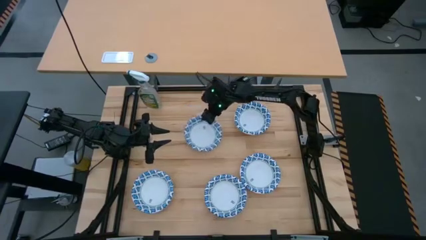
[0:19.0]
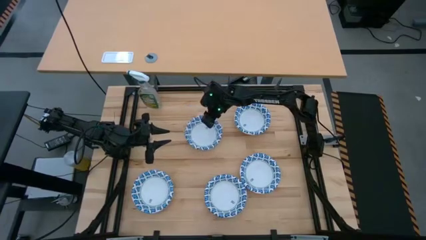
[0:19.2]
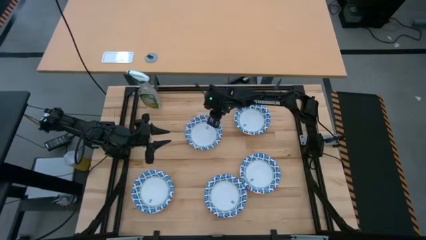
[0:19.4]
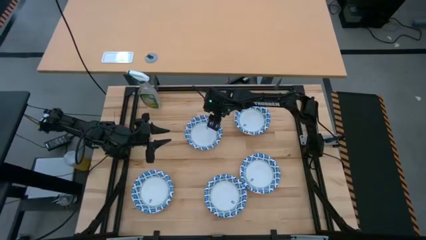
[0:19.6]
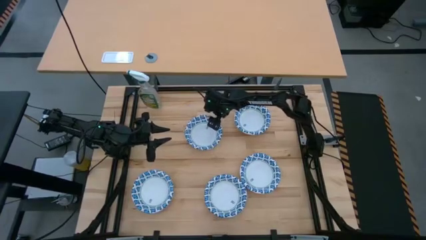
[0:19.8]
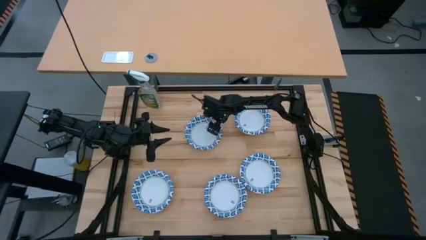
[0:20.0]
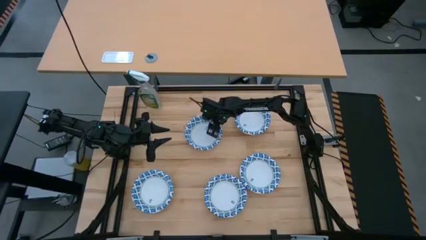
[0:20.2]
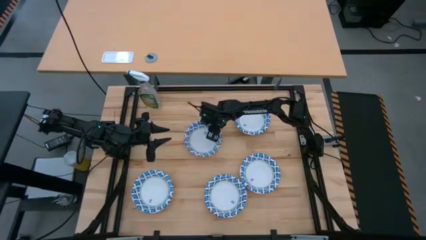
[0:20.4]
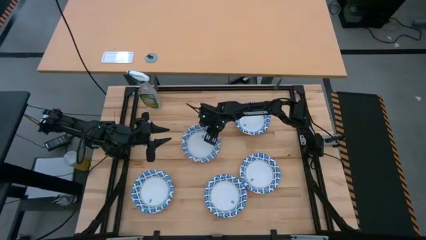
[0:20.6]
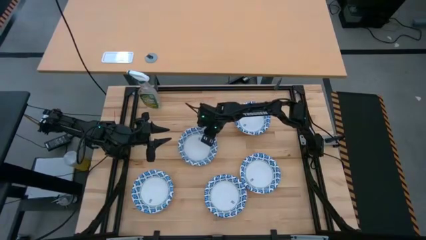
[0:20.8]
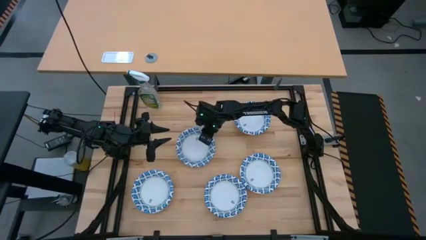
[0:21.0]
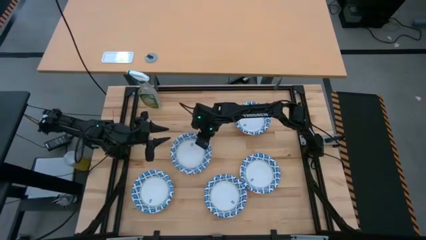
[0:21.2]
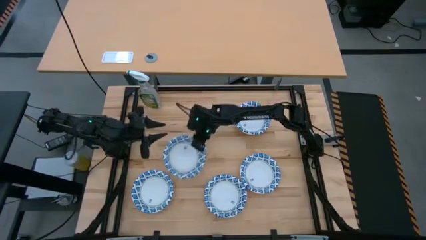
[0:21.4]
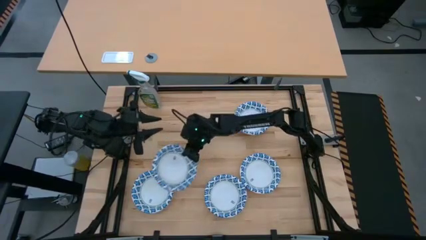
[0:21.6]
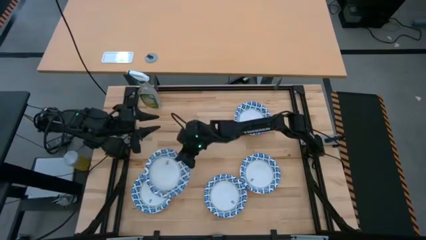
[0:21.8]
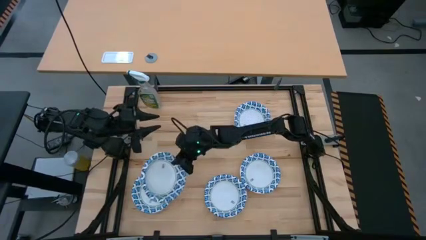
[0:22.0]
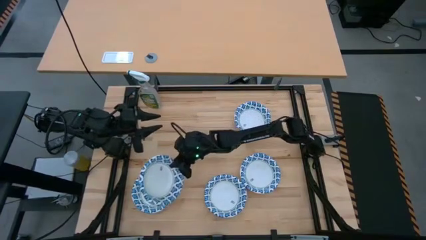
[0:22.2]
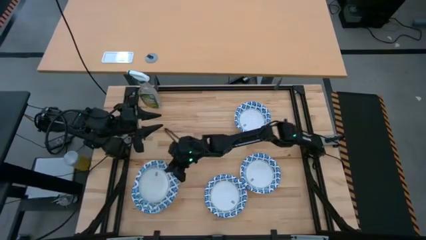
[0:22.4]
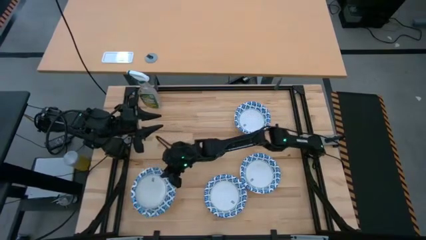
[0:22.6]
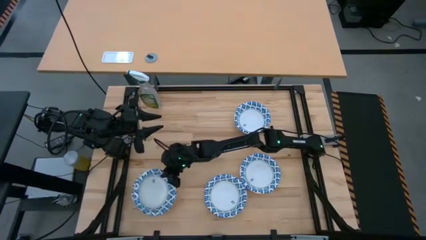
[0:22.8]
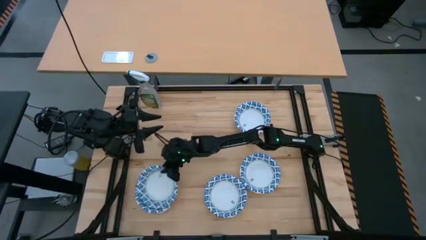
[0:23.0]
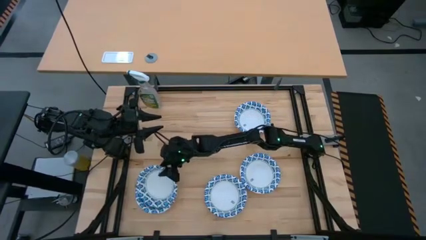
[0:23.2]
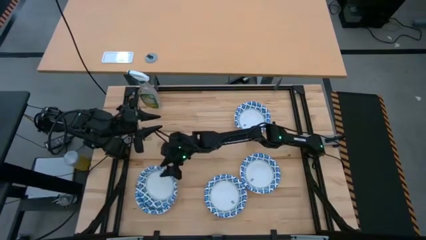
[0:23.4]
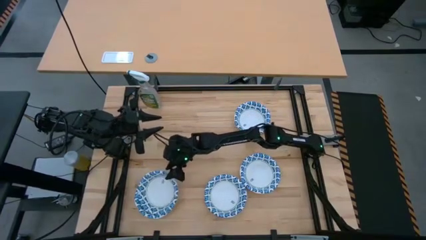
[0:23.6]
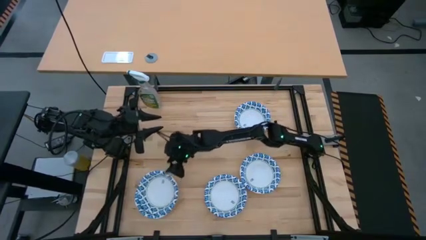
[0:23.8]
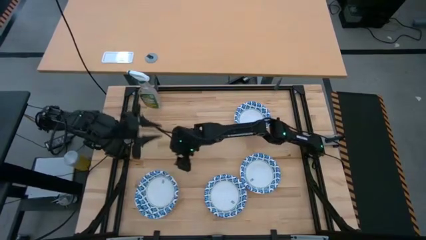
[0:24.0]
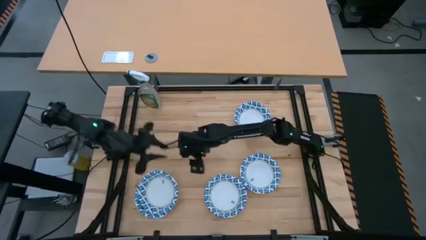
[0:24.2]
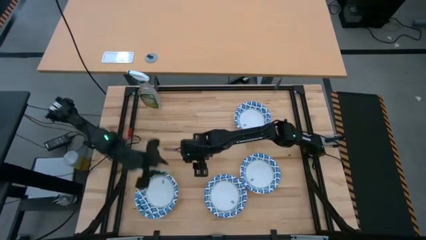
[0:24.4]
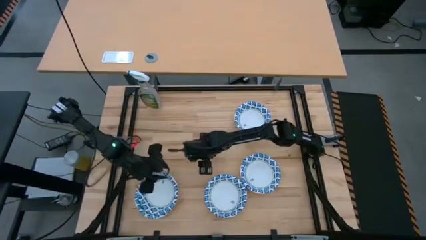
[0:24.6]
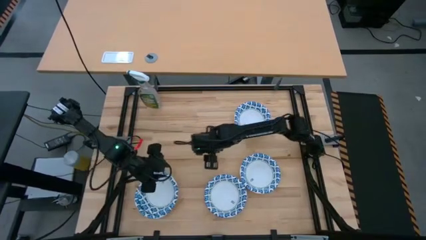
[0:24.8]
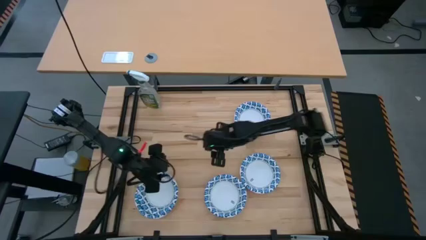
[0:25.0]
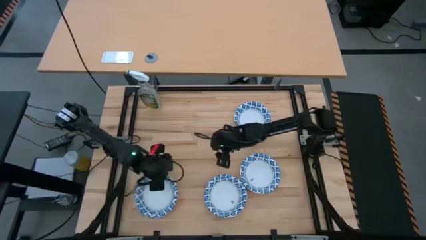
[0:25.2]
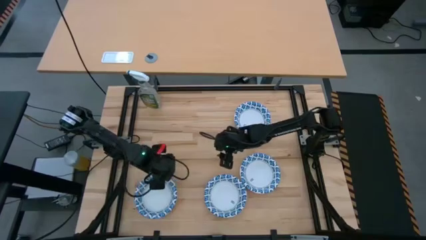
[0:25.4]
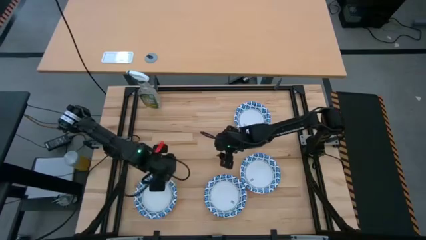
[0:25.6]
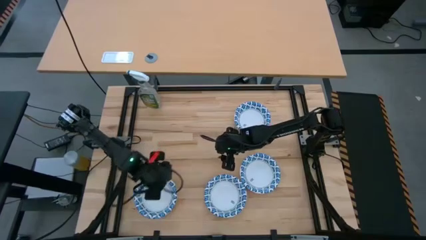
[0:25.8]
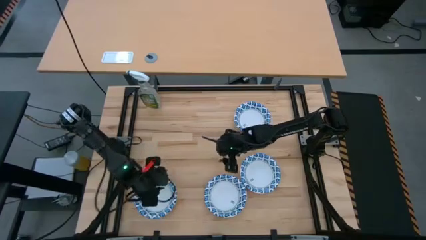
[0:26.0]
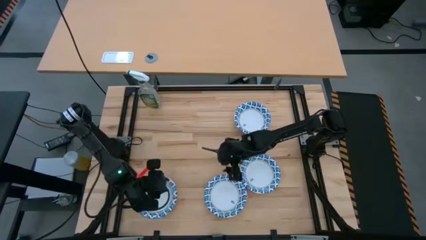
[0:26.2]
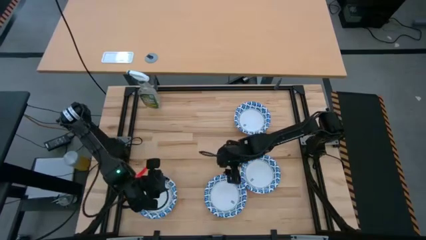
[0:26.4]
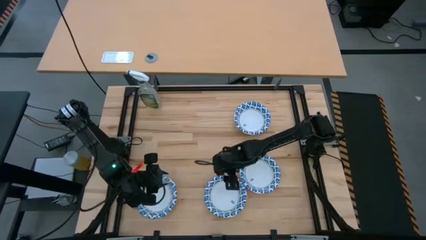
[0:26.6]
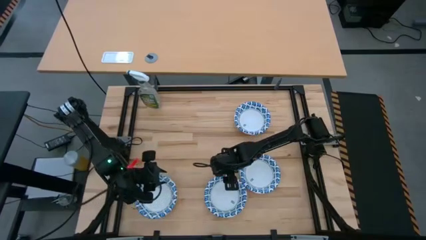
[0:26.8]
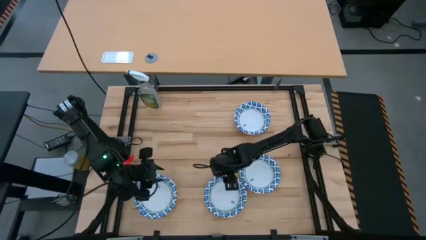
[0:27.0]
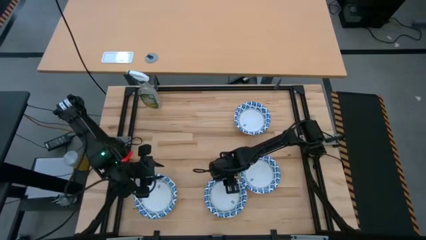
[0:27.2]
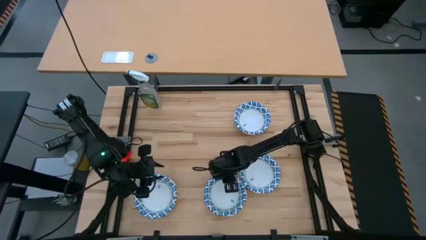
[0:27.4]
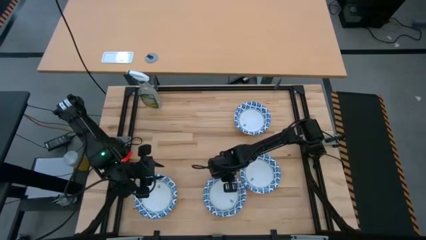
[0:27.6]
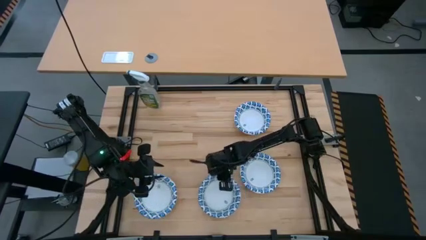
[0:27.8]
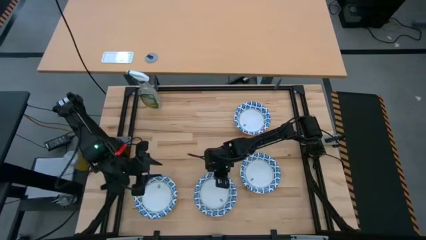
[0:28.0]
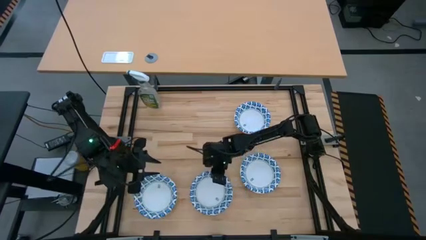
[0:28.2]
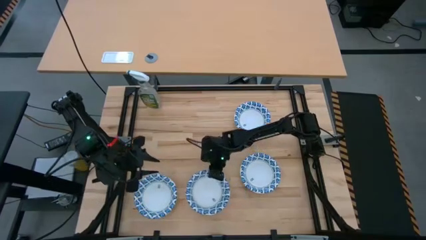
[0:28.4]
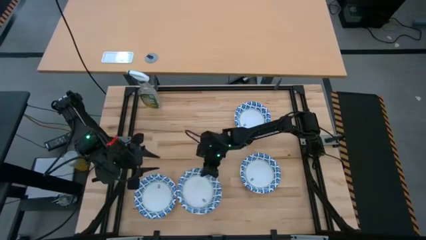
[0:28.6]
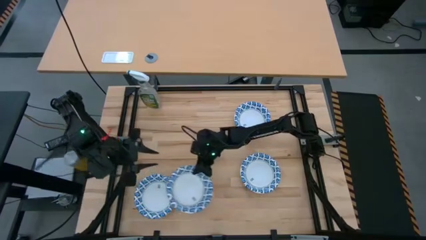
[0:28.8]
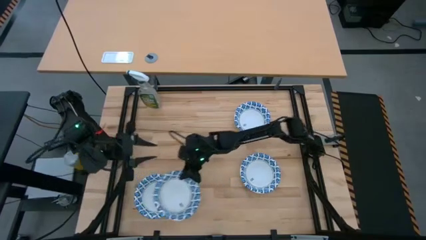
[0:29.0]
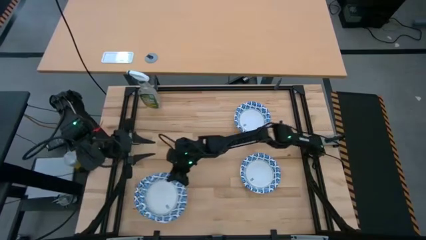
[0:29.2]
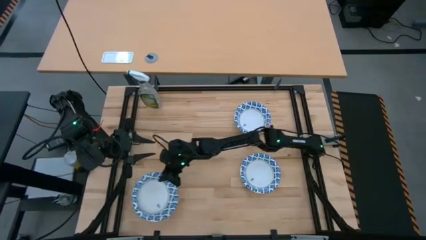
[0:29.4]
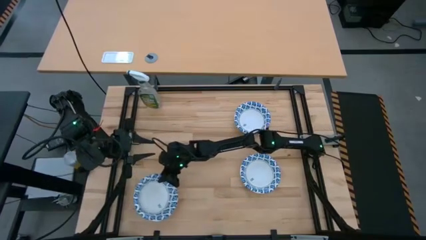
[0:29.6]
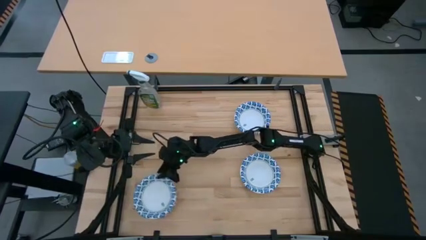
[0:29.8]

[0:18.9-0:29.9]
Stack the blue patterned bowl on top of the blue patterned bowl

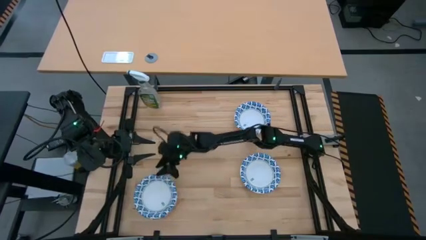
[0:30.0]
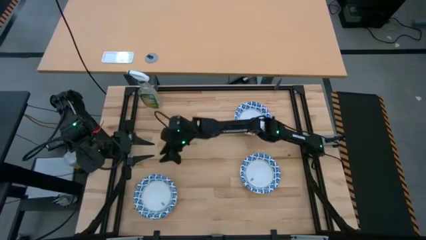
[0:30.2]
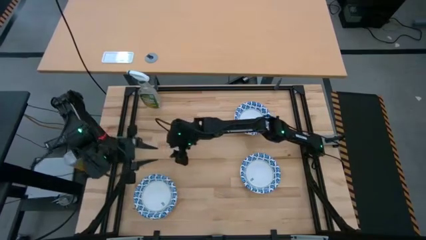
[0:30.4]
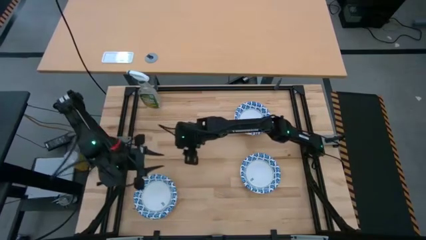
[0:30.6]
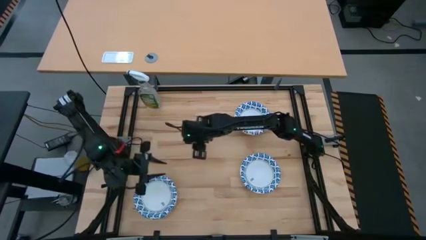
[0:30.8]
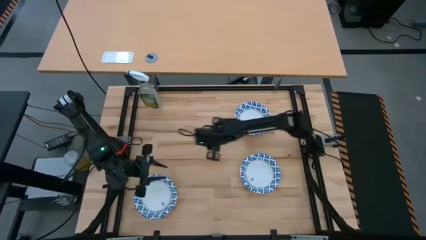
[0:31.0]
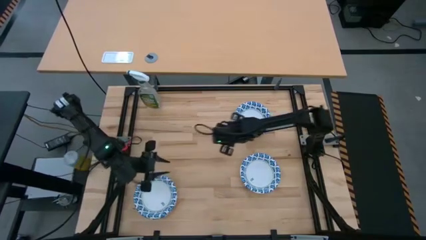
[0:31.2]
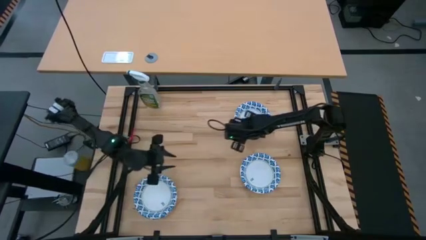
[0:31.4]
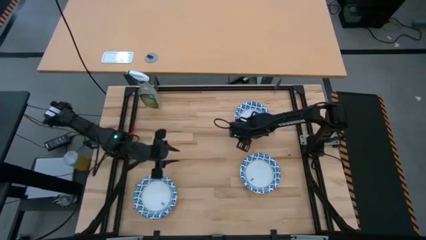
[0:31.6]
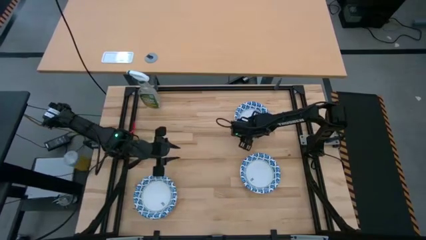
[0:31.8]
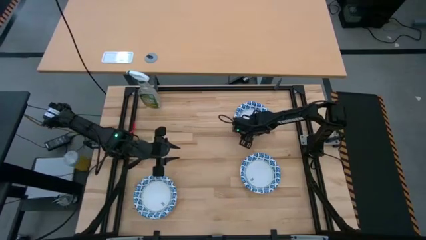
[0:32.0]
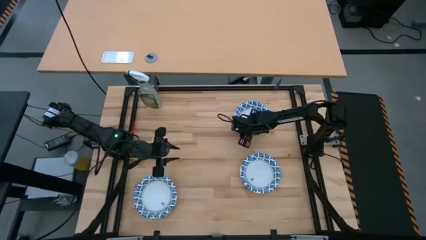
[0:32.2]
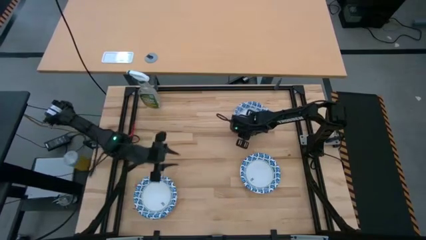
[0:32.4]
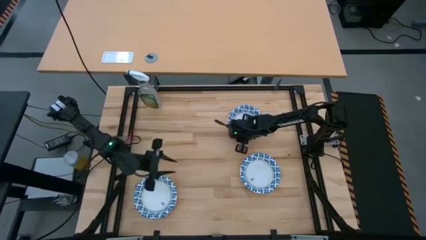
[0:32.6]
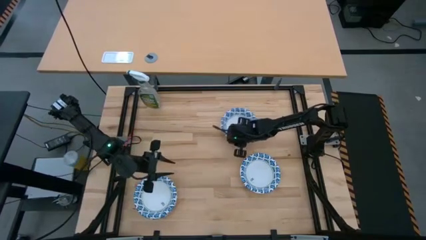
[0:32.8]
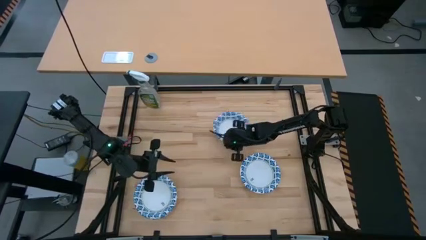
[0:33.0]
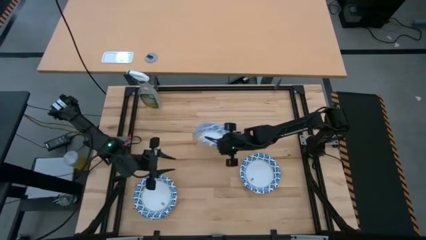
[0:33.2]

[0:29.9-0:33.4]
Stack the blue patterned bowl on top of the blue patterned bowl
